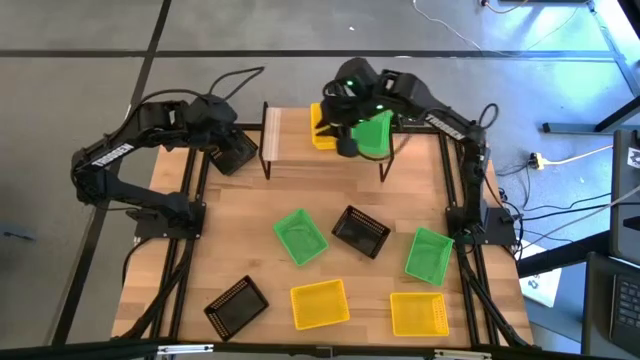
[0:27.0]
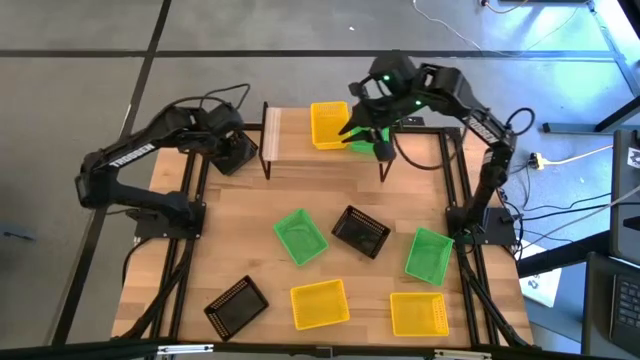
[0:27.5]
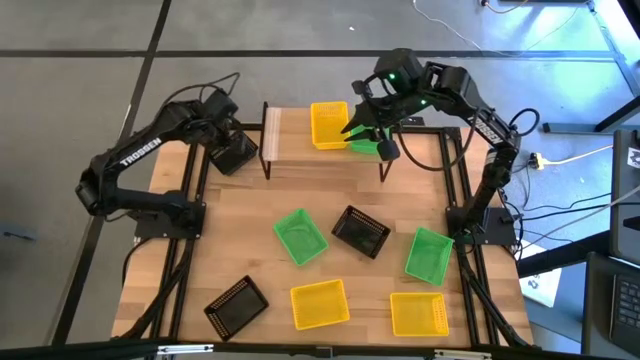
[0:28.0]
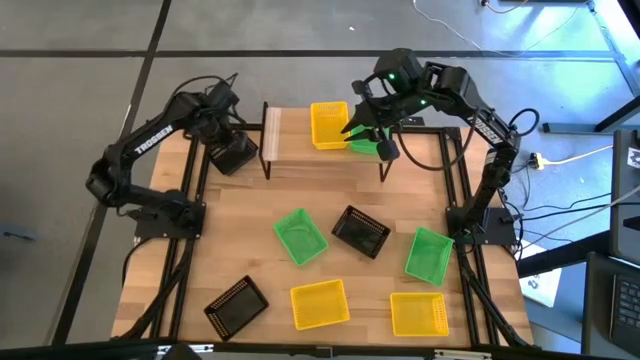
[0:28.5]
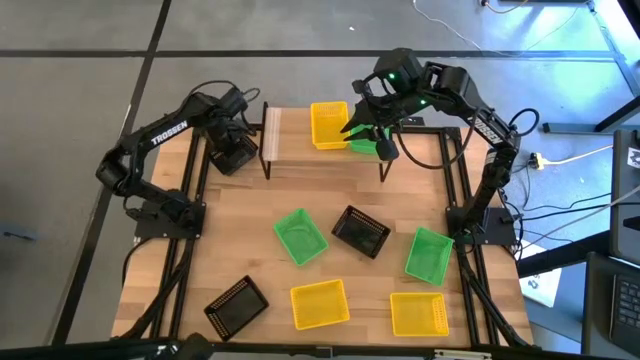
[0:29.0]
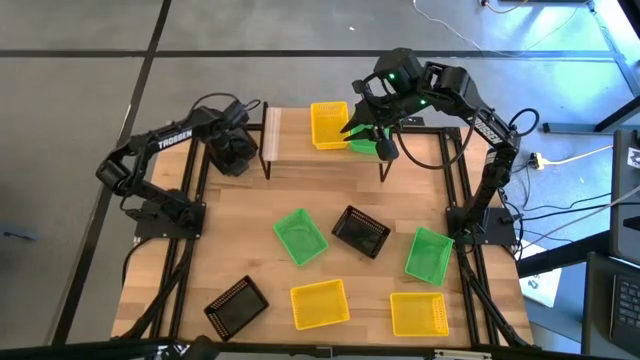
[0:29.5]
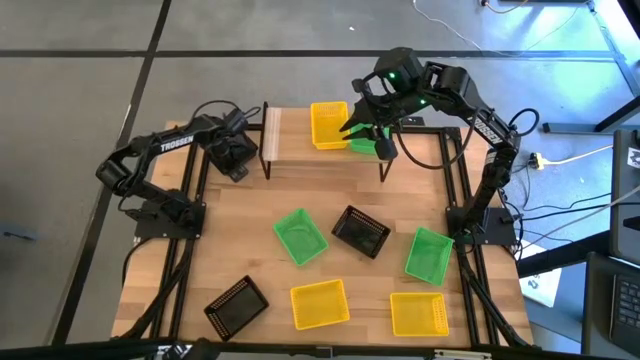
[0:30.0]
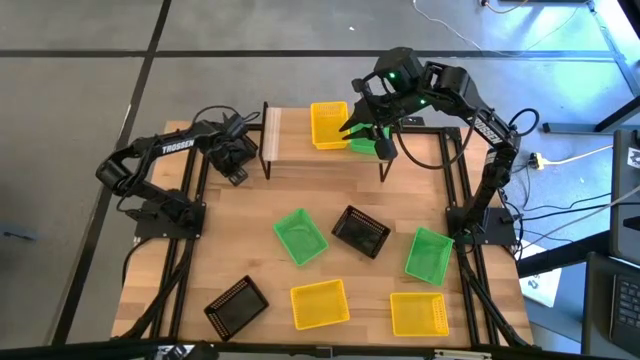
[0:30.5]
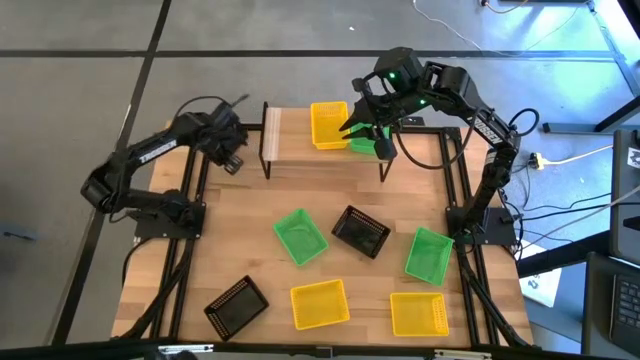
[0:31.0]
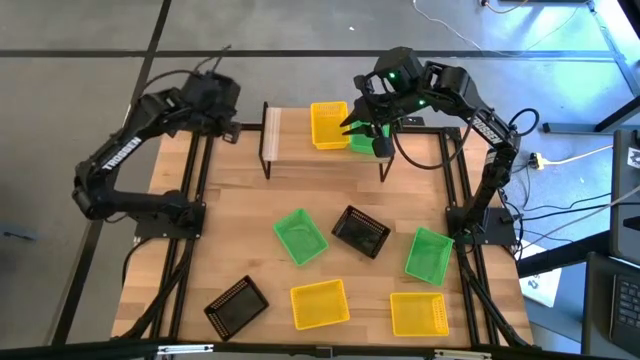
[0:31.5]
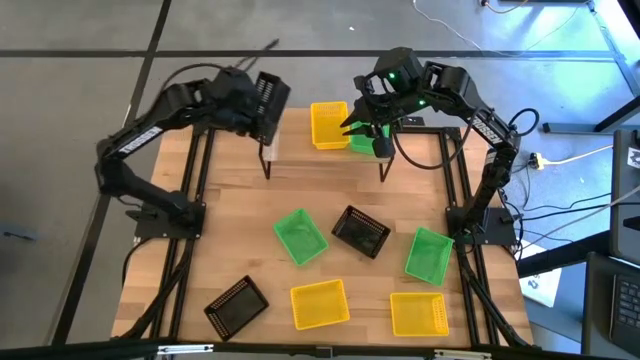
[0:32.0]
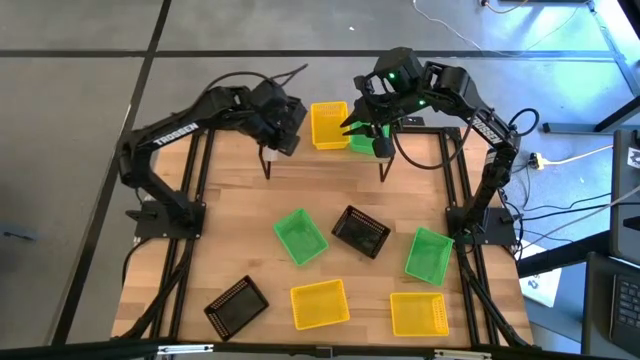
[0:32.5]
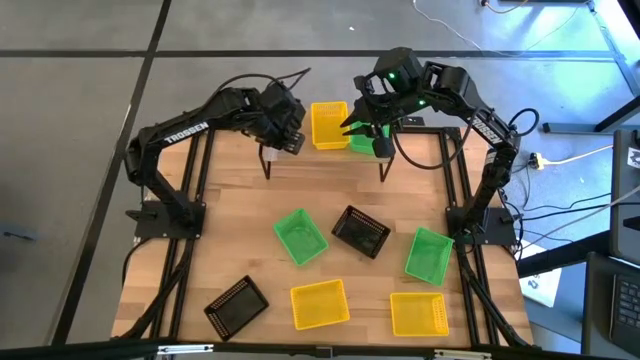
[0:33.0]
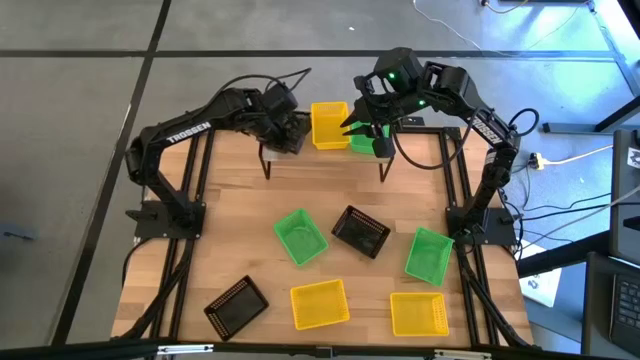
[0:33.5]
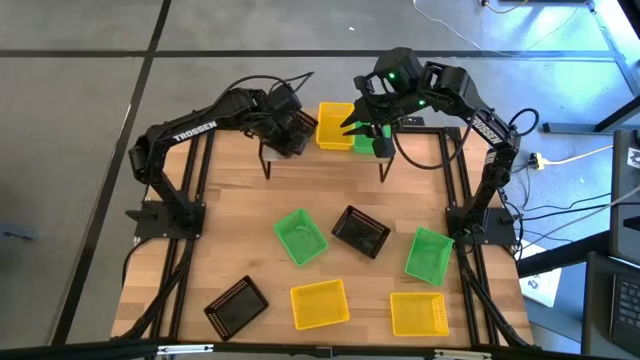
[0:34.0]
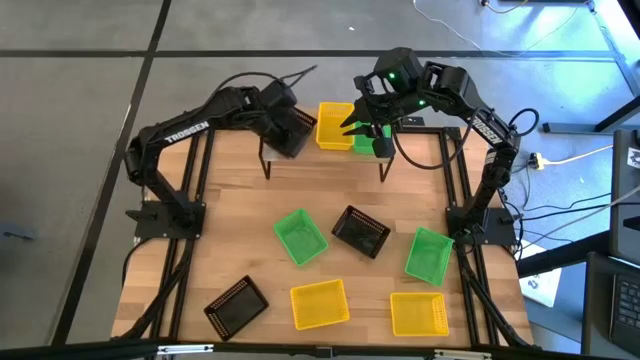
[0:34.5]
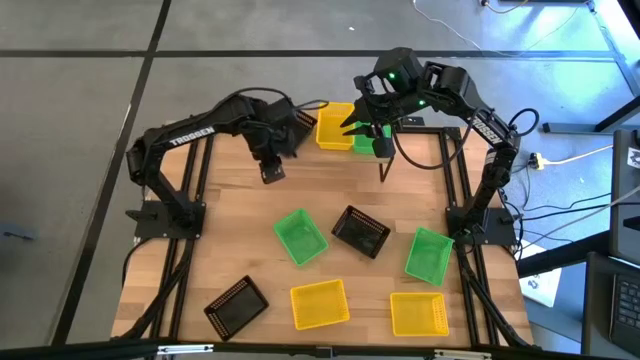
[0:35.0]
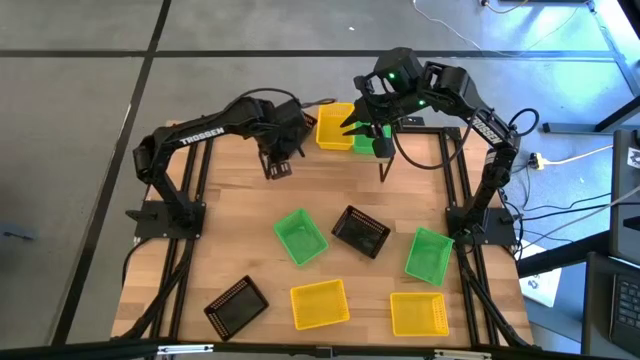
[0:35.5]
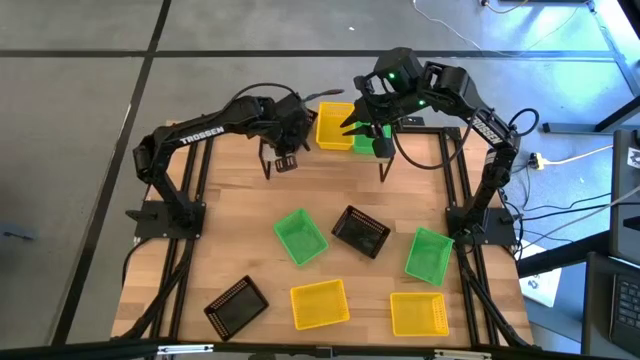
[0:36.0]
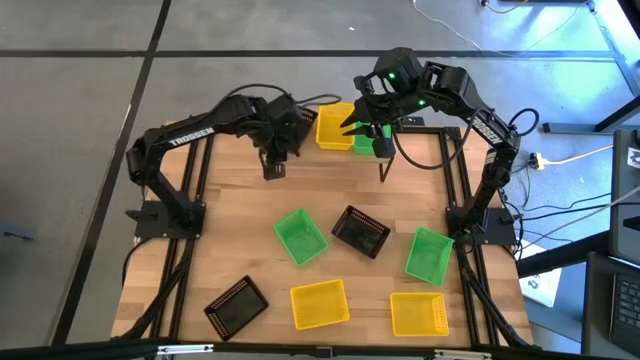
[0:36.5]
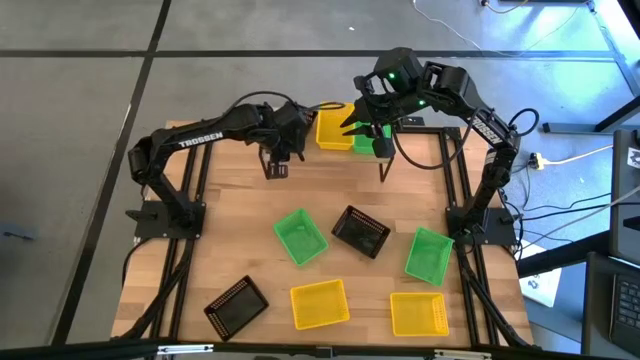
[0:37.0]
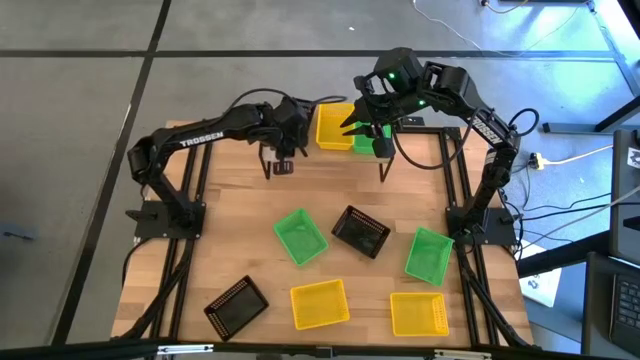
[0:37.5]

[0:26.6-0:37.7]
Task: Stack baskets on shelf by color
Put the top left black bin on the shelf

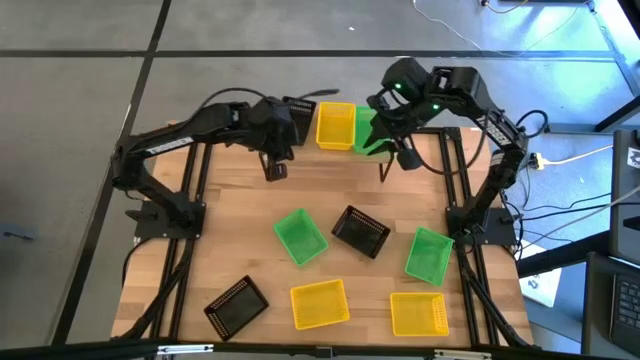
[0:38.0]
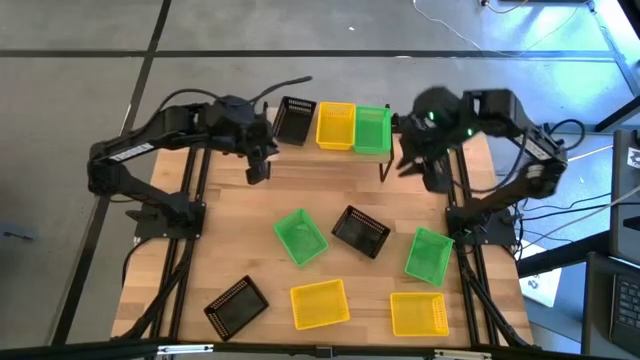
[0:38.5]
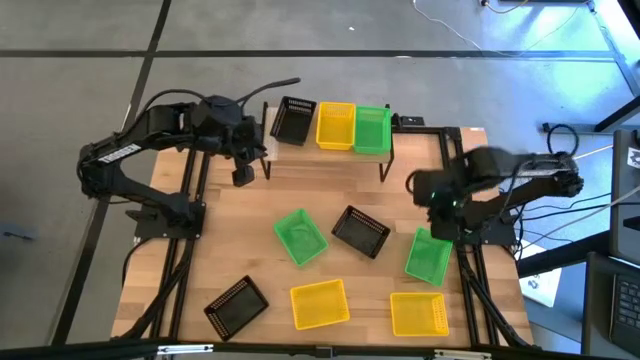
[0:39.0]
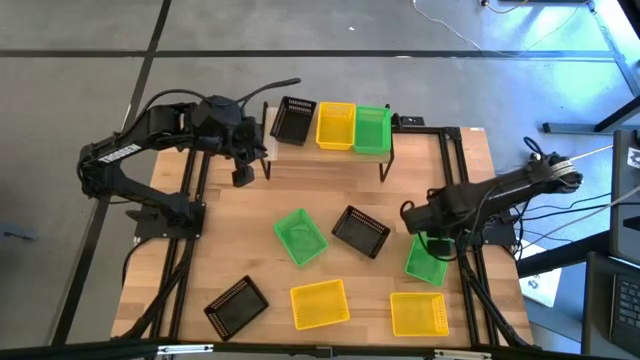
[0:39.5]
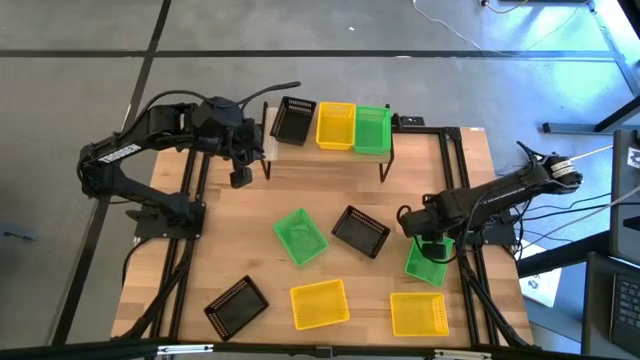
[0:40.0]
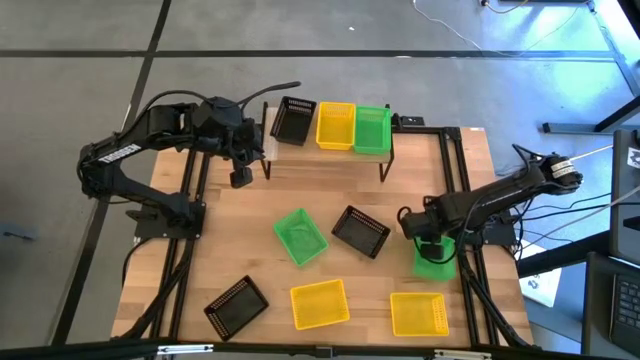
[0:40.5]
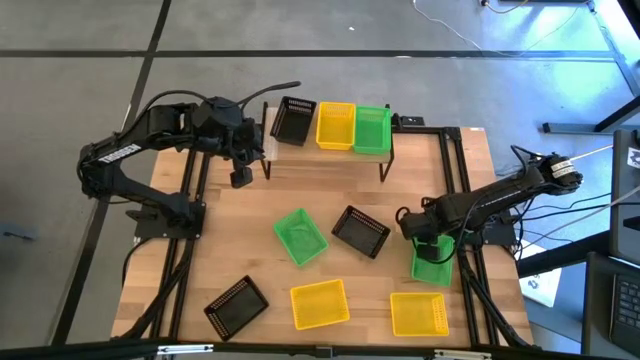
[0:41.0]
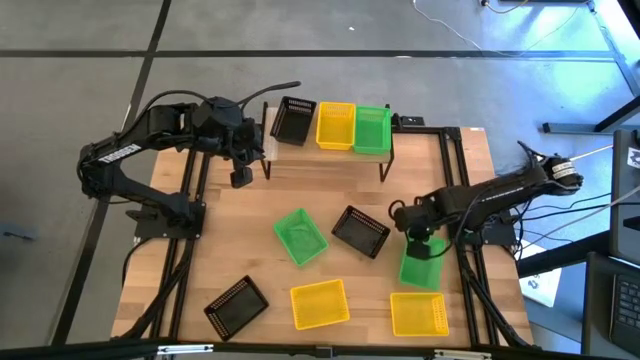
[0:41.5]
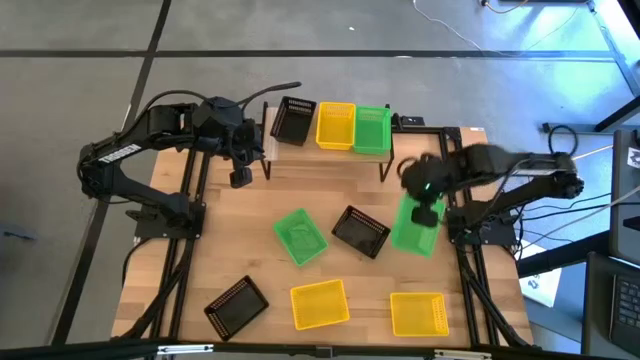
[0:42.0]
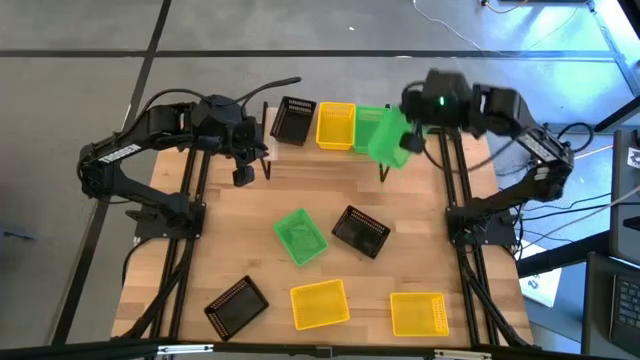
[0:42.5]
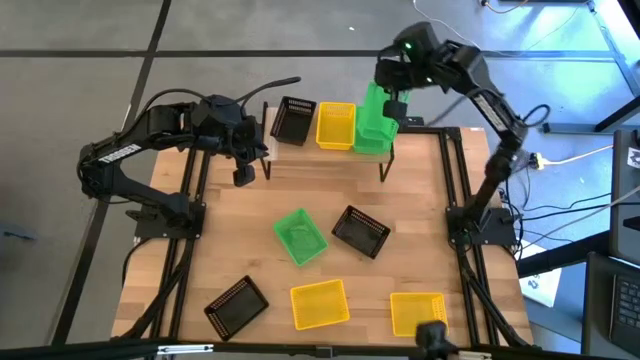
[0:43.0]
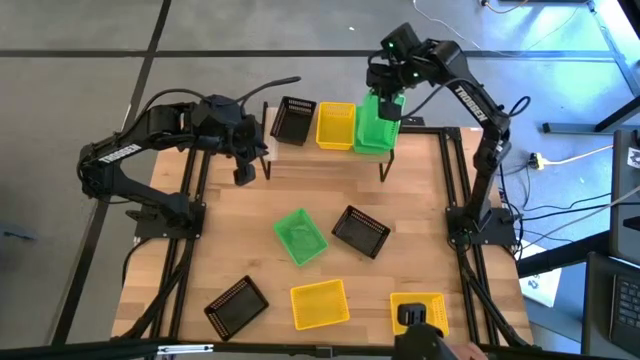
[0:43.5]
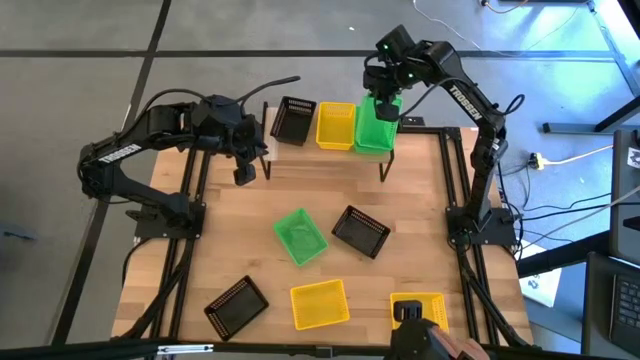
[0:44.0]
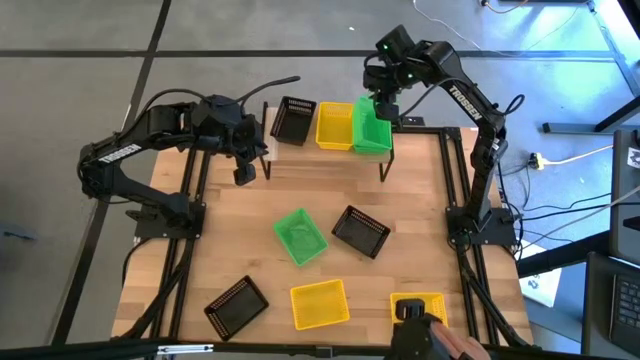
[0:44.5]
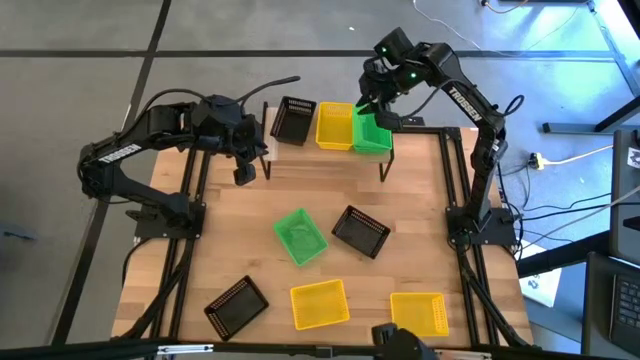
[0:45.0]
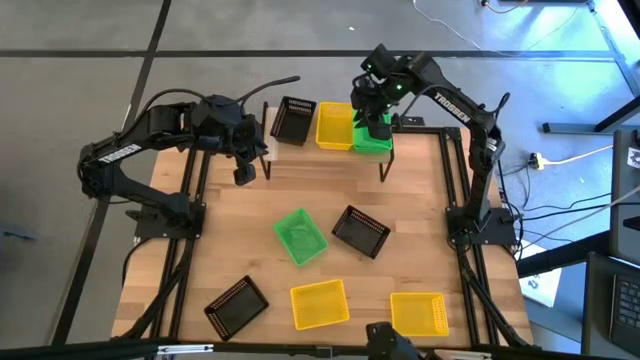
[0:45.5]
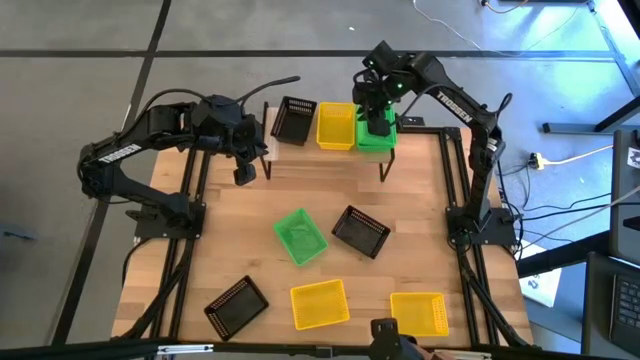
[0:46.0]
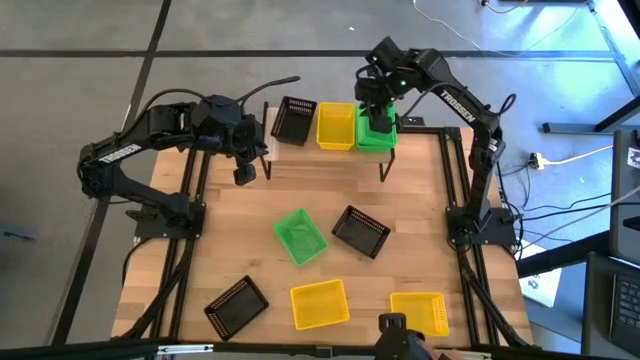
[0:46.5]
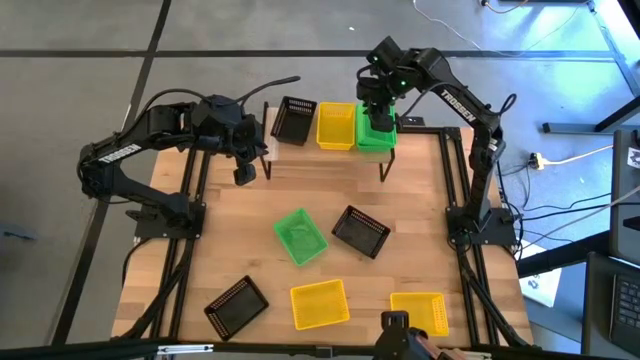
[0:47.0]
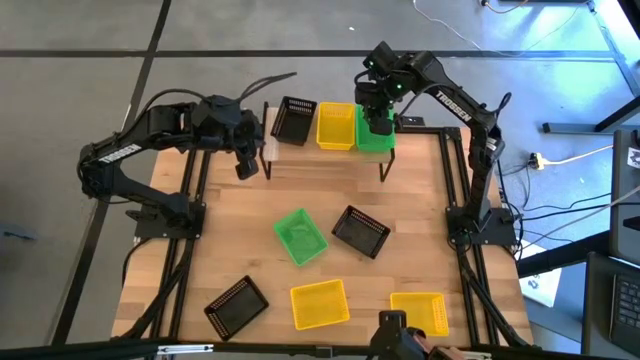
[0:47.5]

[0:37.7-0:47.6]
Stack the right green bin on top of the other green bin on the shelf
